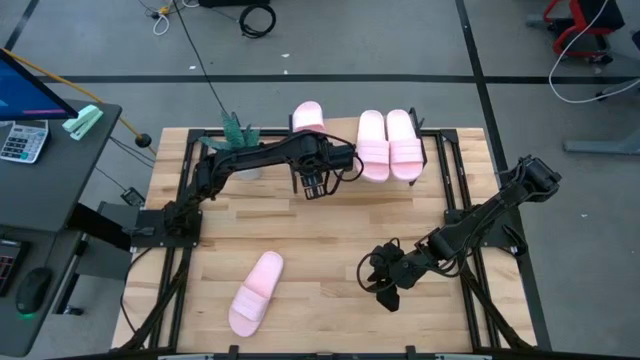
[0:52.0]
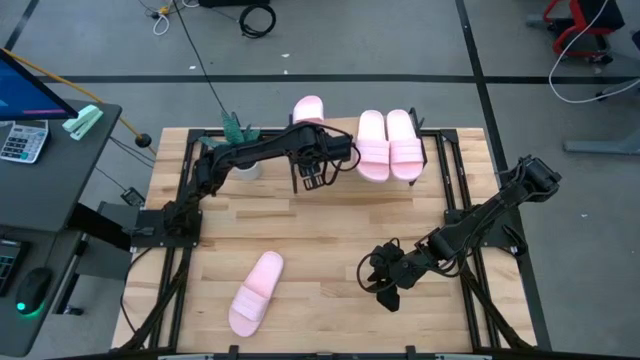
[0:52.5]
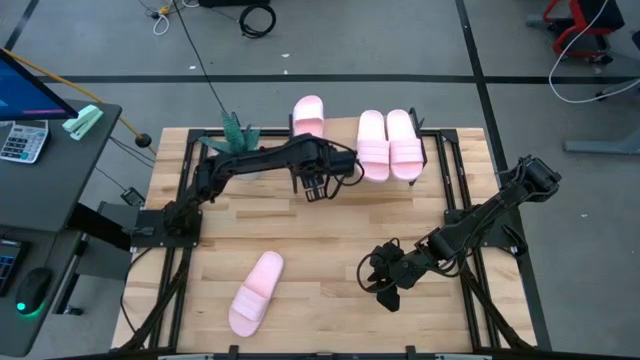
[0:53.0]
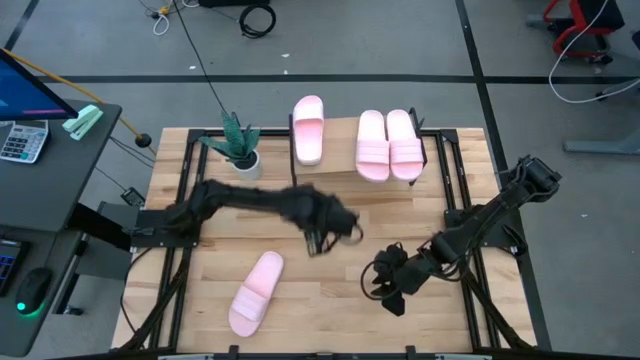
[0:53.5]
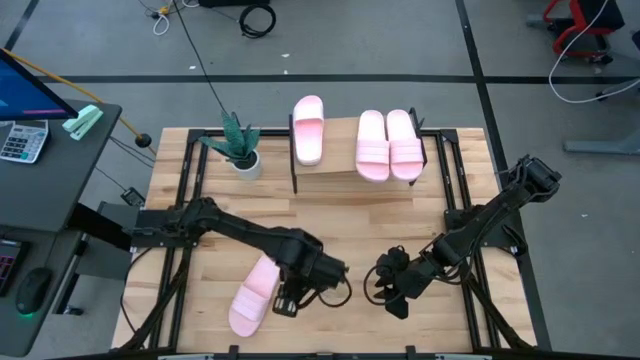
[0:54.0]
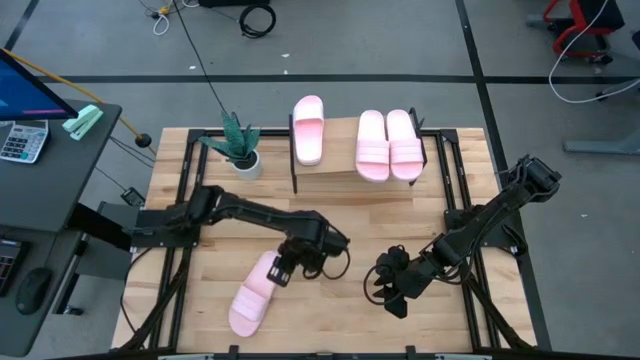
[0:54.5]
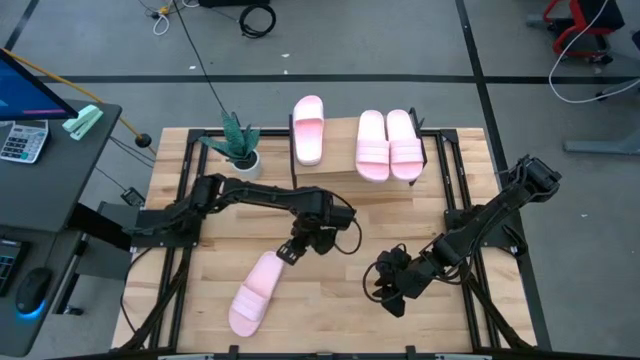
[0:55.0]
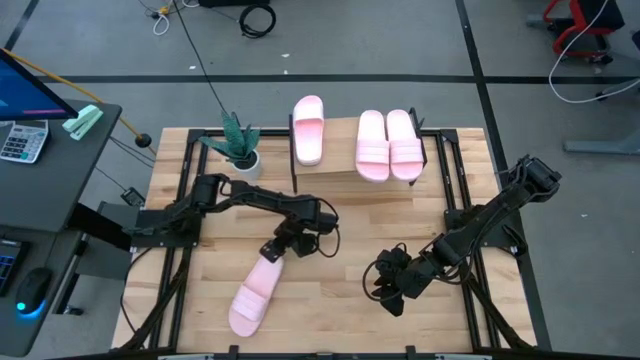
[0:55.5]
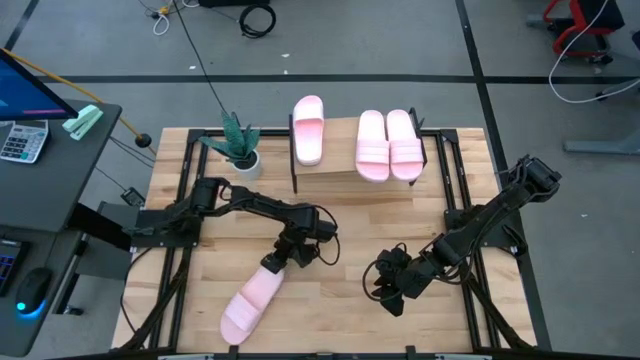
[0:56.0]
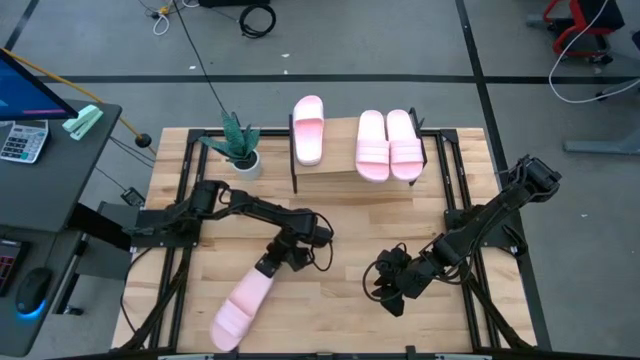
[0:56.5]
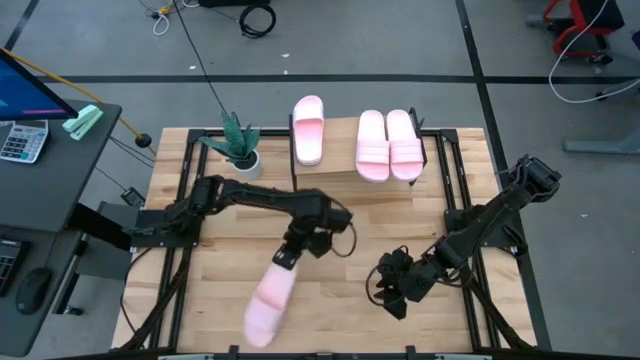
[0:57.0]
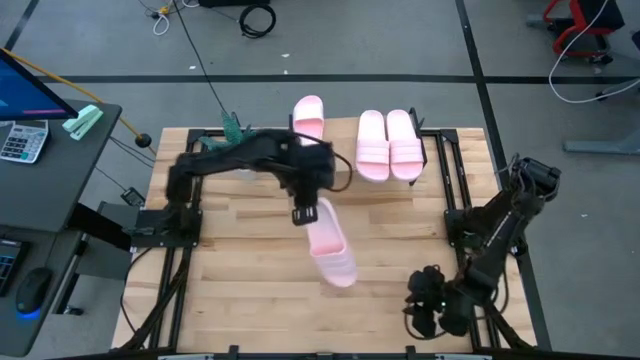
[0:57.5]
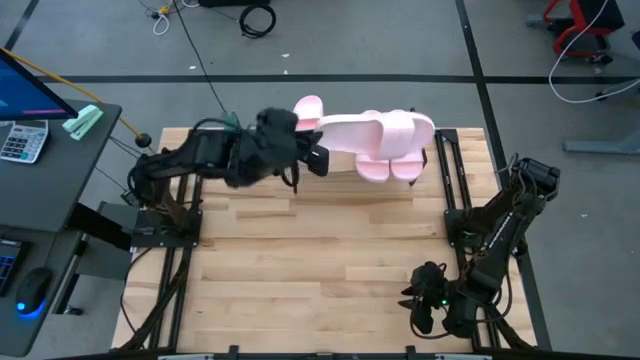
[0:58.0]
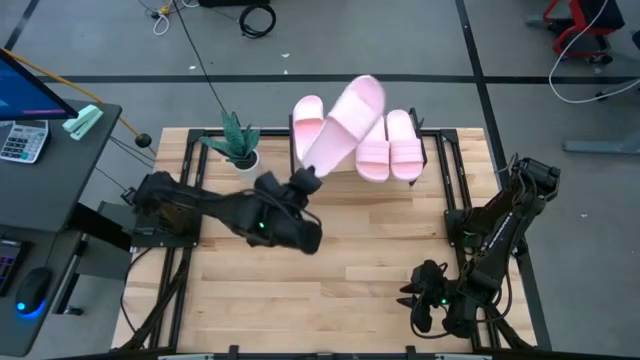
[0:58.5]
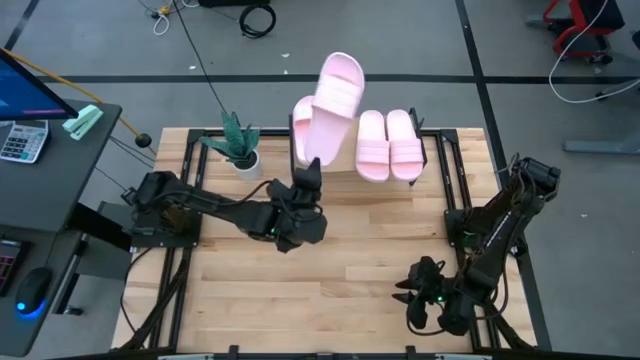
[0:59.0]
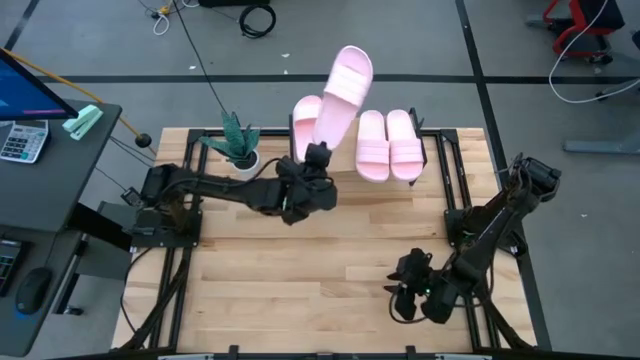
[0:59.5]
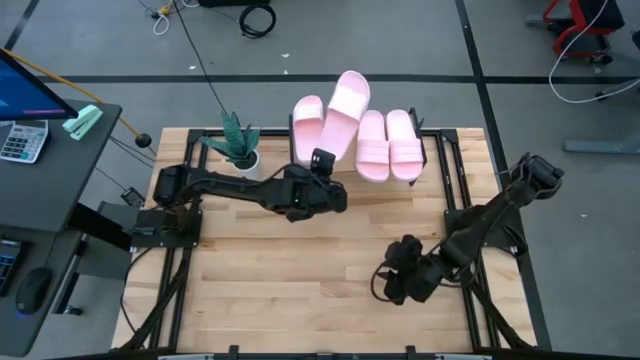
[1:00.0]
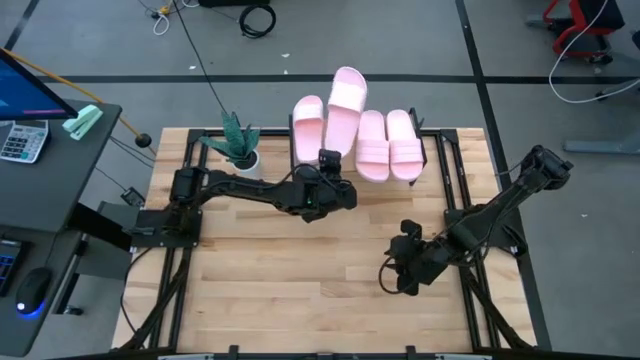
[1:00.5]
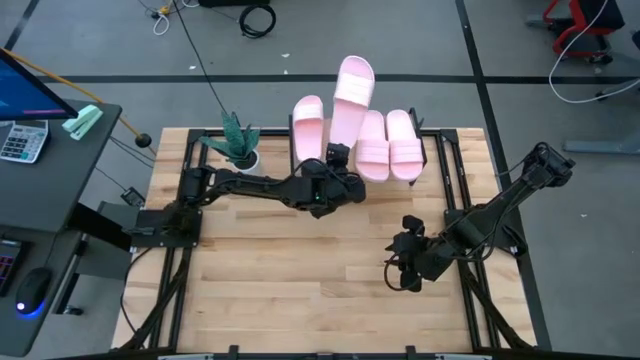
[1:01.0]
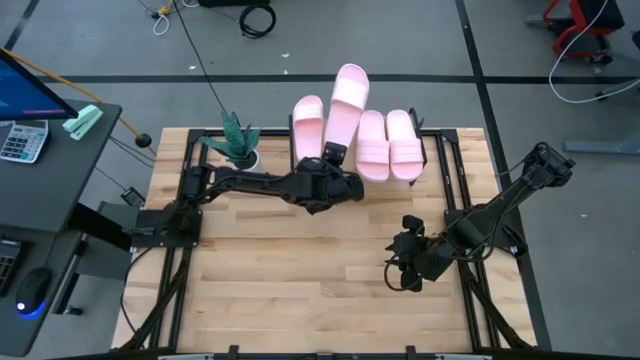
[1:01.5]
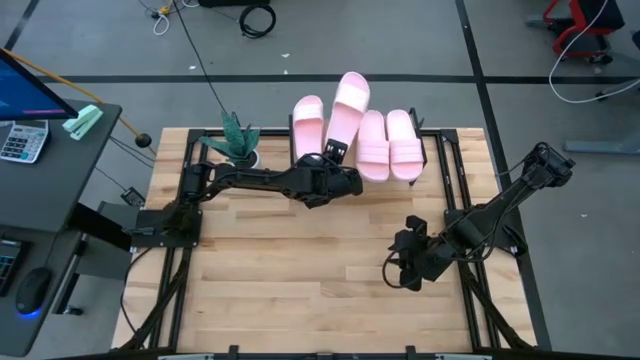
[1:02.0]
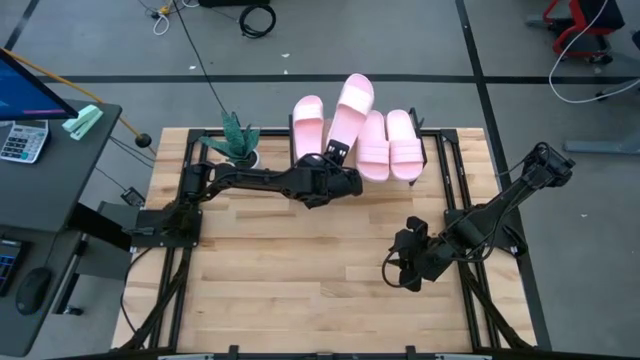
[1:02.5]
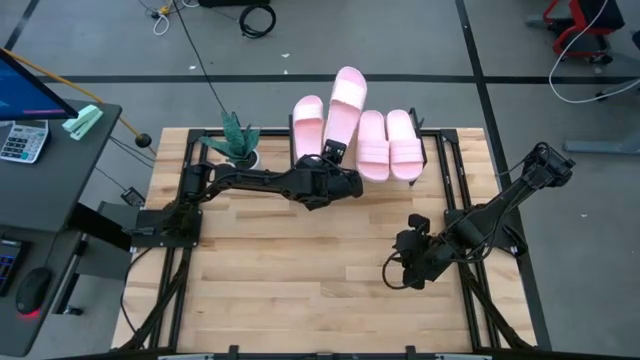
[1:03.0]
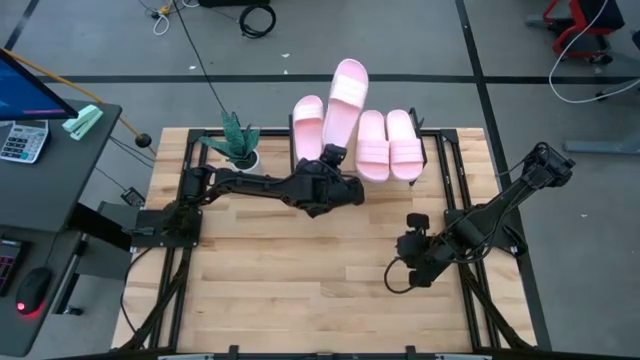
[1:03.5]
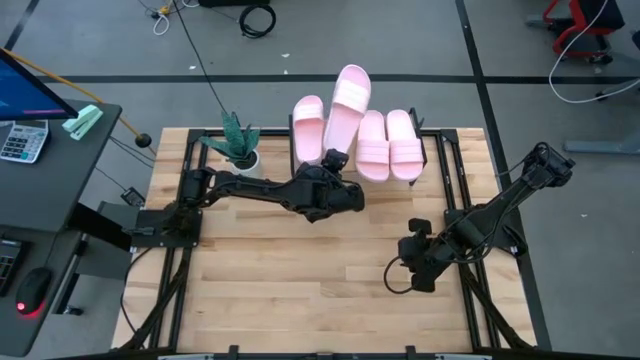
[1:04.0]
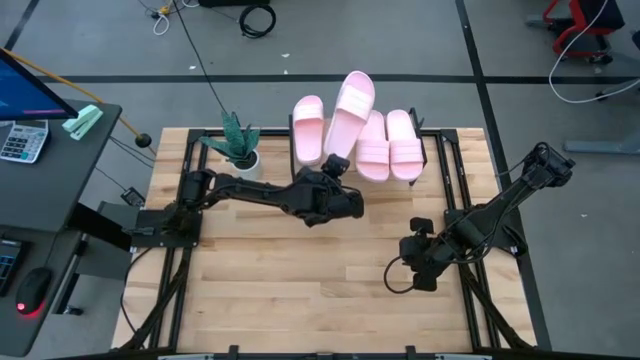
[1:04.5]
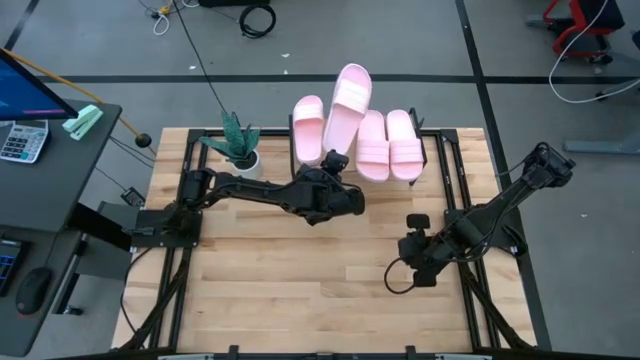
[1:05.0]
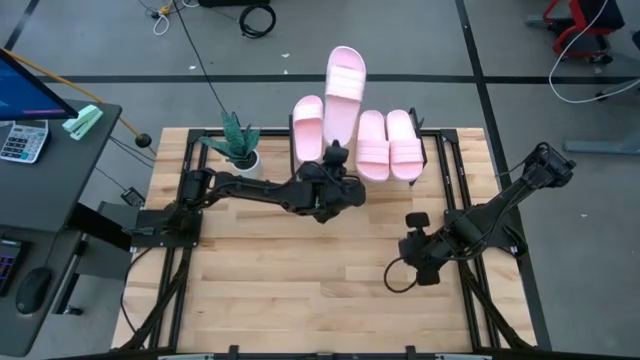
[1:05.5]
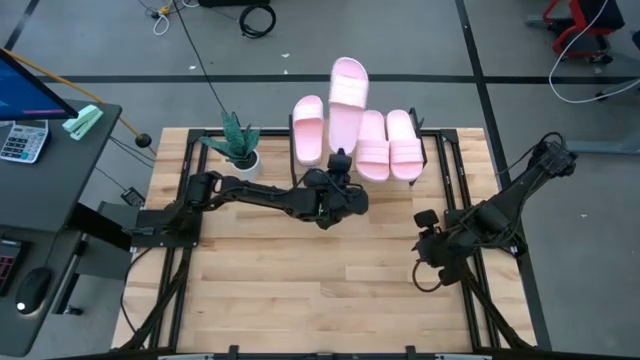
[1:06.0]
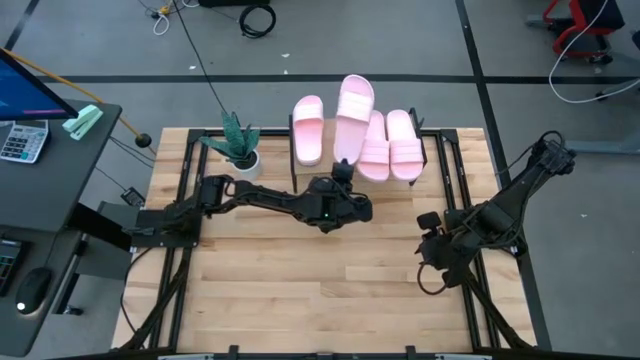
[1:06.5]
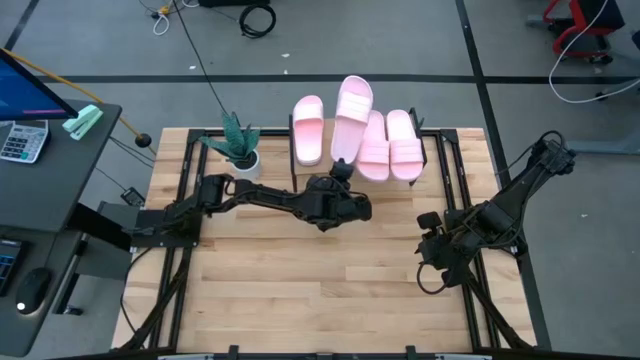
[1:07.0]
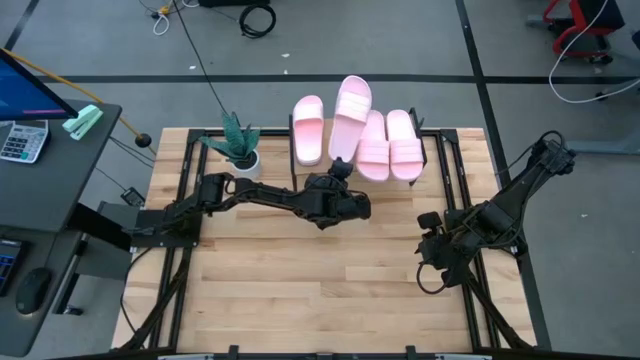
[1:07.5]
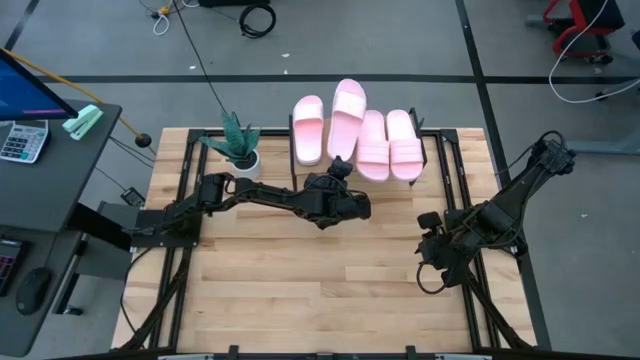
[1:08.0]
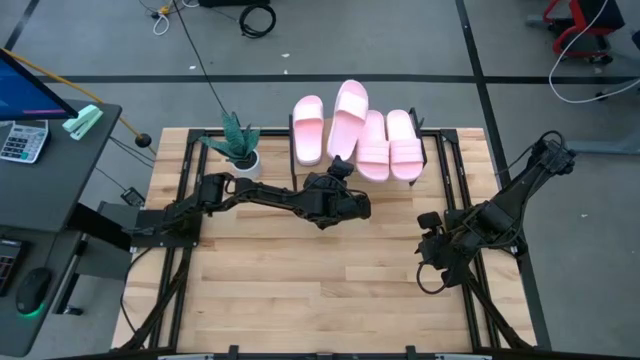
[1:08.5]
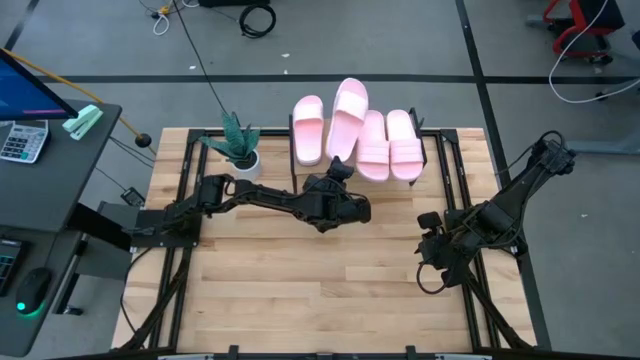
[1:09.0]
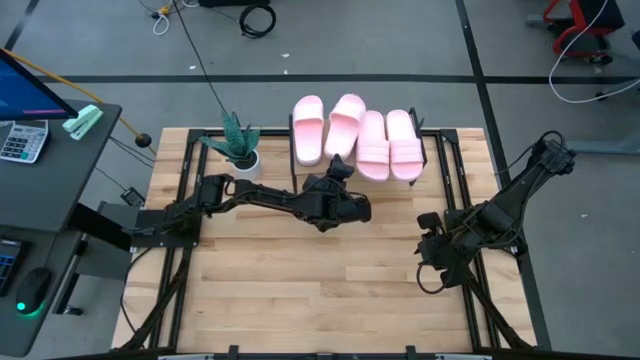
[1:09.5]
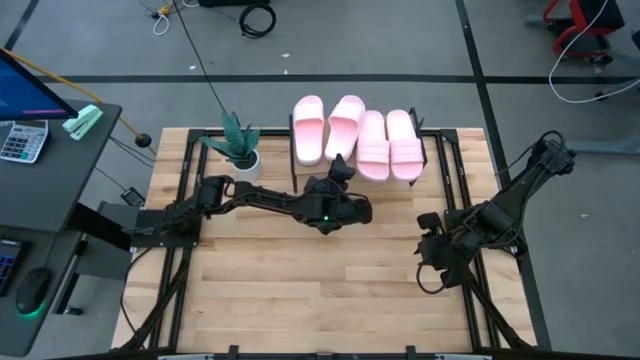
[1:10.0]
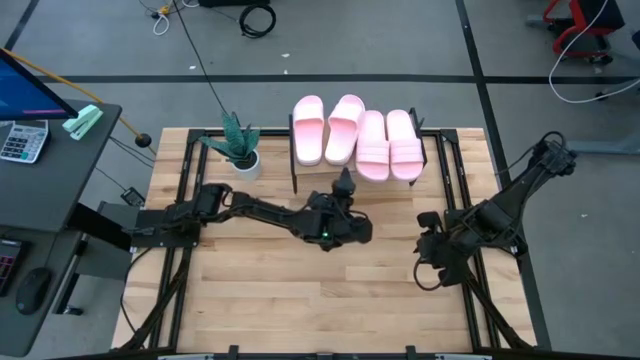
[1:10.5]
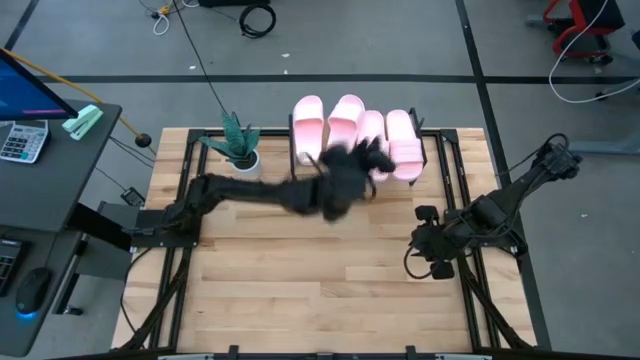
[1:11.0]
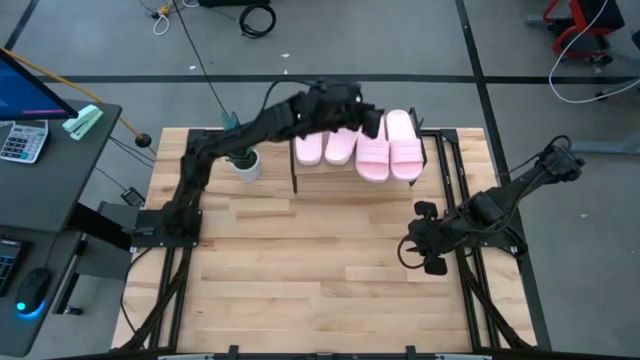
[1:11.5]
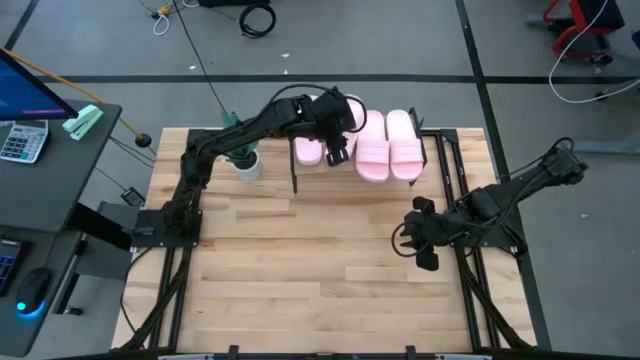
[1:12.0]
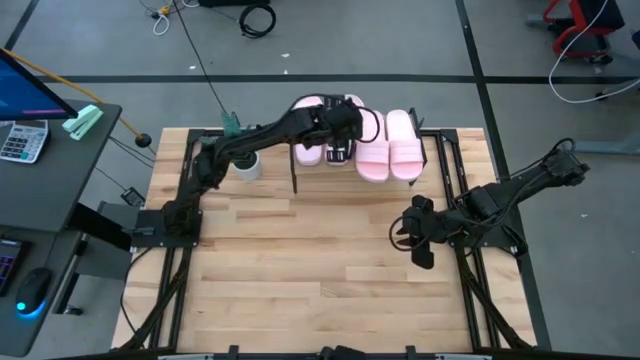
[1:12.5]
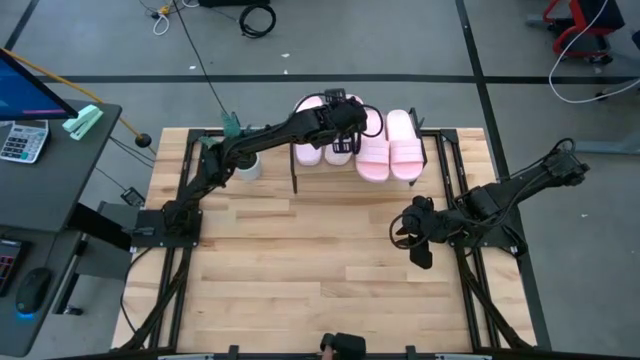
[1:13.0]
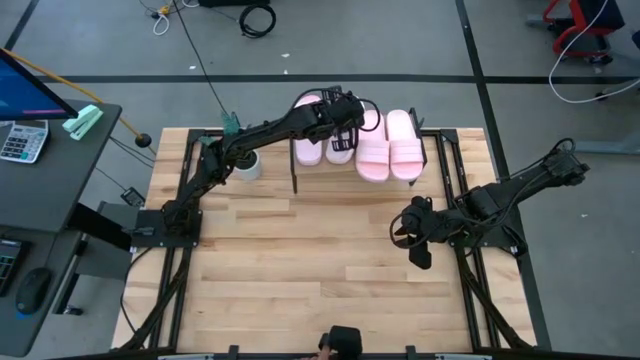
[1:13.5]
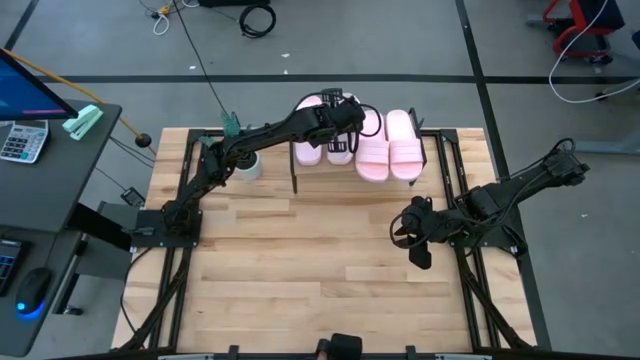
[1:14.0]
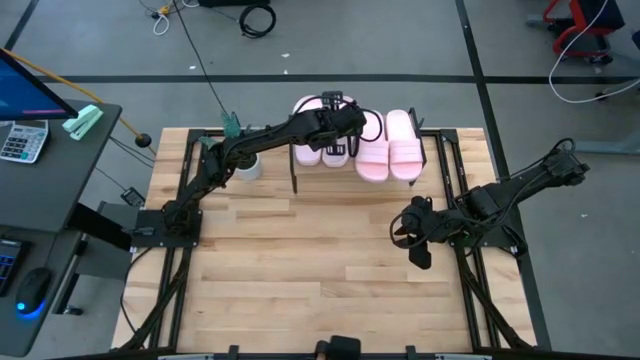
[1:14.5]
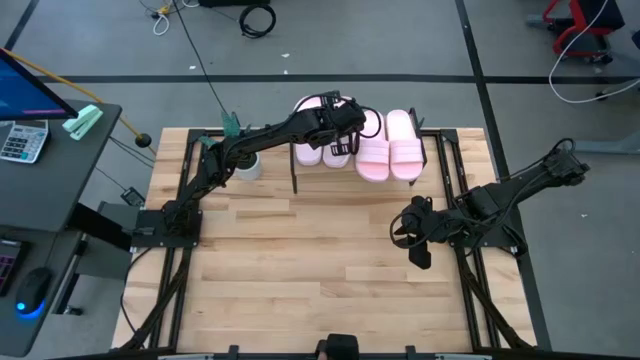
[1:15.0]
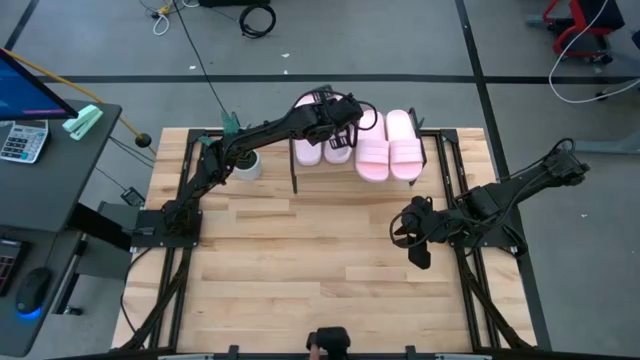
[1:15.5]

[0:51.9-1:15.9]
Task: Pick and place slides into the shelf
Put the pink slipper on the shelf
